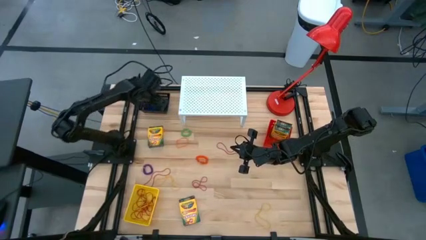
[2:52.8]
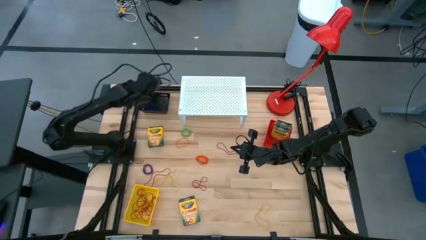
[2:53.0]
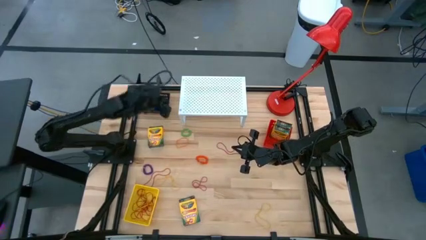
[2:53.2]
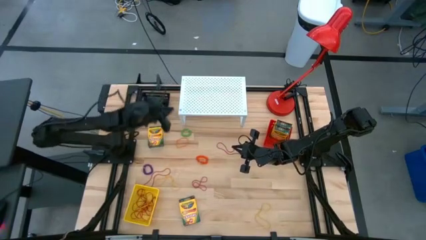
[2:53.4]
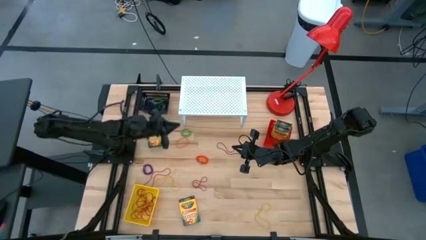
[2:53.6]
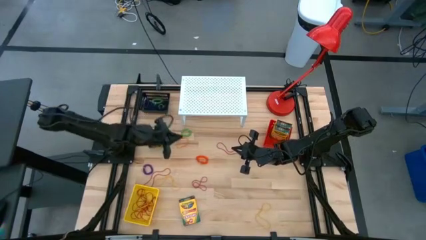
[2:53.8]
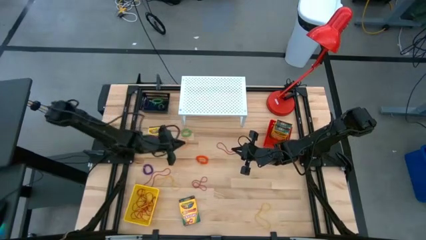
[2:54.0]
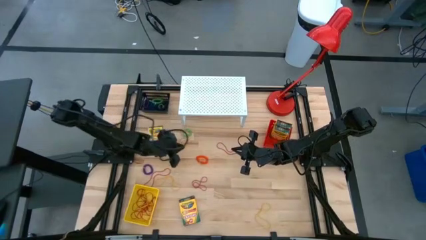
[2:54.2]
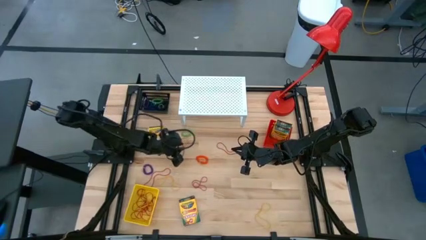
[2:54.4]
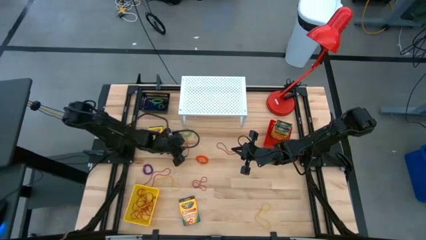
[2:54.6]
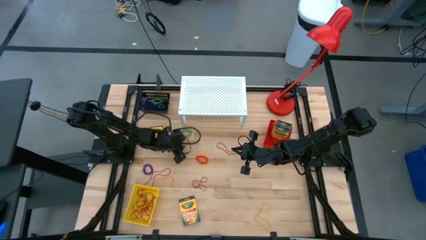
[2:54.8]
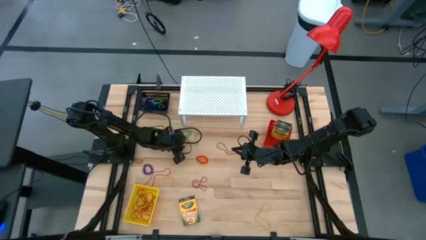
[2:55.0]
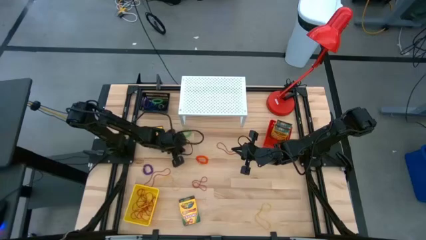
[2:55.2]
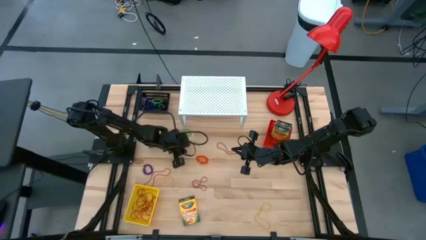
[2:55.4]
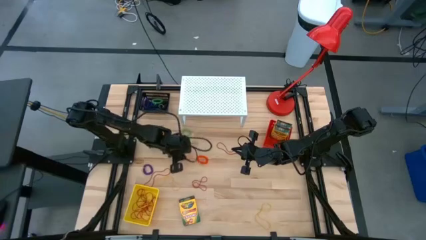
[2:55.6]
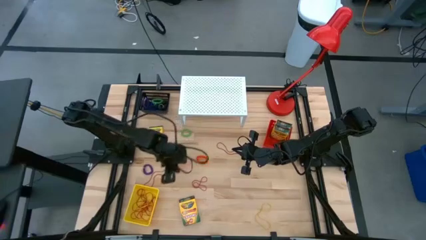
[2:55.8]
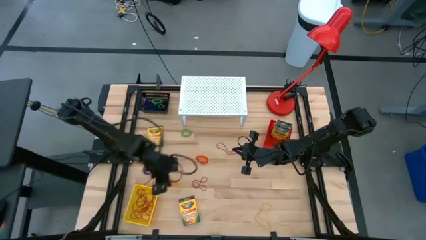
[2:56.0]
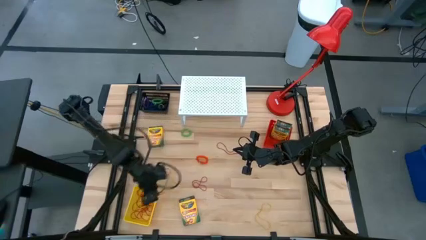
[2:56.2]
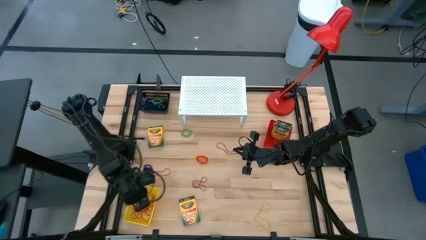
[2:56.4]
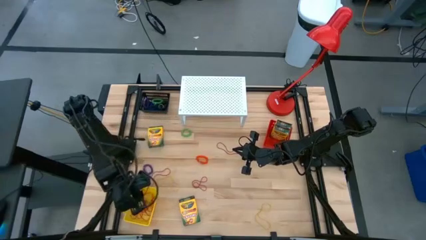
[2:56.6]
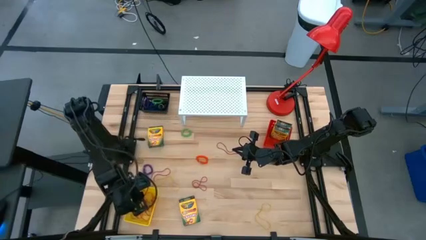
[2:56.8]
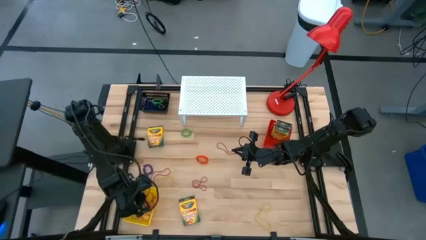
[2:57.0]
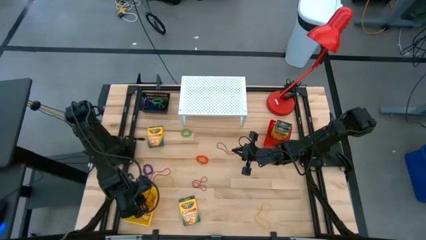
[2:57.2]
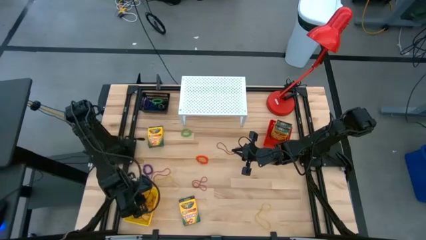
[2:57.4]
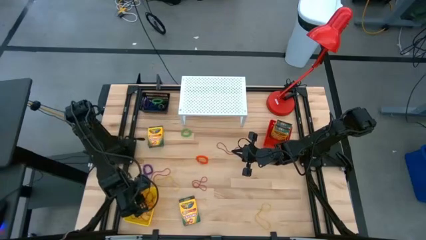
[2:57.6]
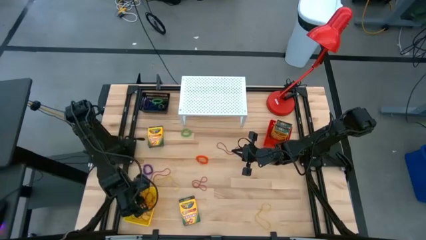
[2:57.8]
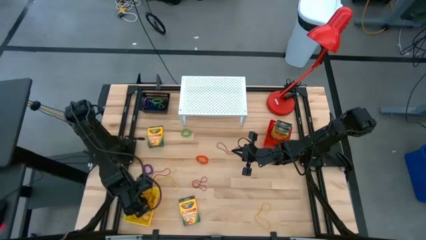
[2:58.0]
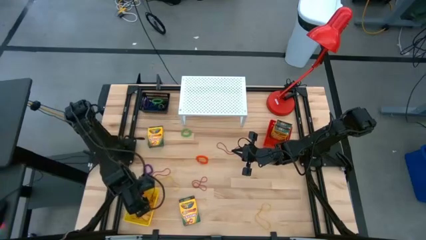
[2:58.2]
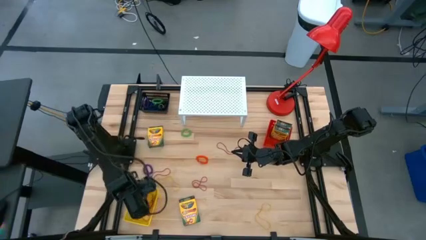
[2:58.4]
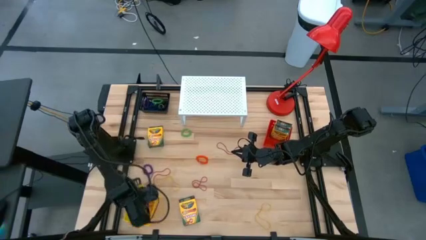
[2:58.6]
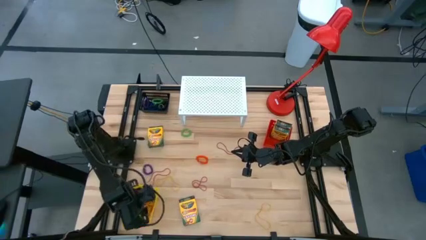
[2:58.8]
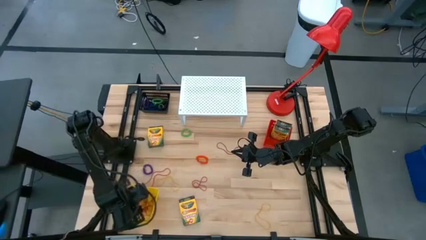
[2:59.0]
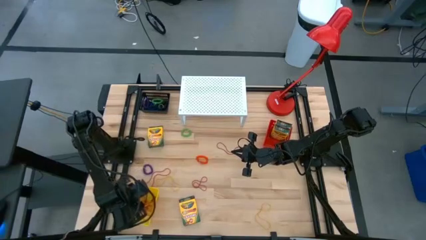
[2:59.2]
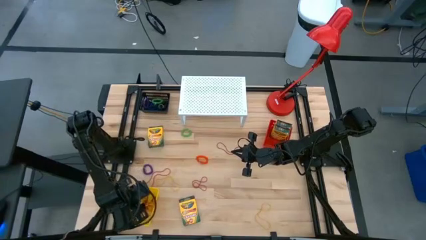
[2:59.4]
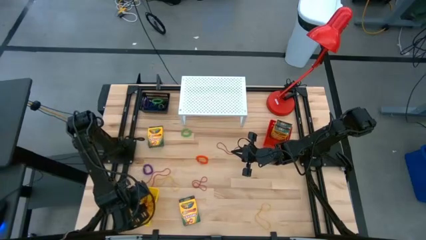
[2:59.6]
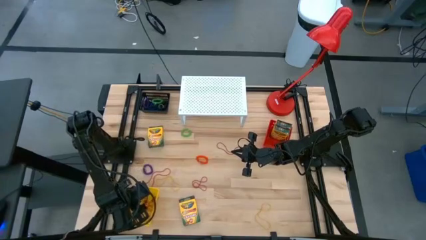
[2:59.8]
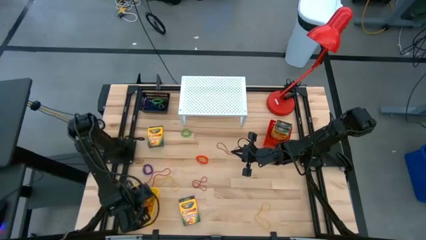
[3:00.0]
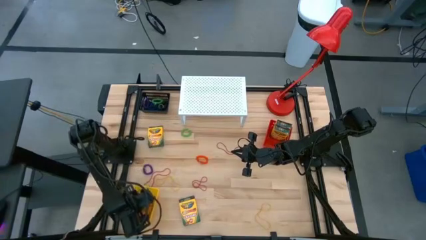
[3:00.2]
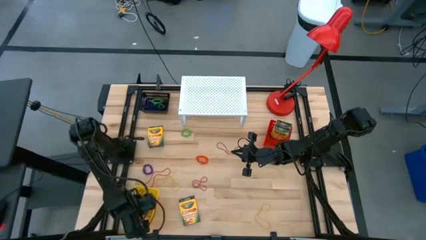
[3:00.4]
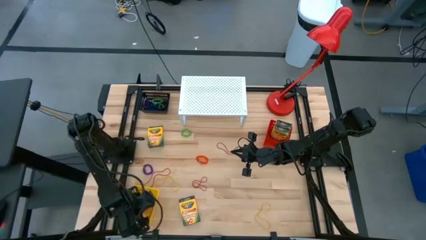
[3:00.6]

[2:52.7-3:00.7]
Task: Pick & Place Office Desk Supplies
Put the orange rubber band into the yellow bin

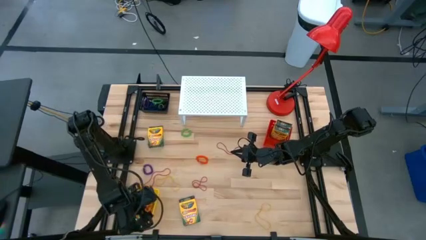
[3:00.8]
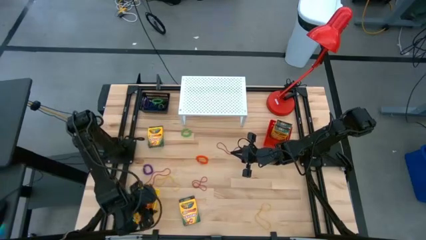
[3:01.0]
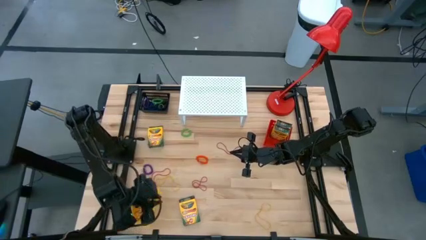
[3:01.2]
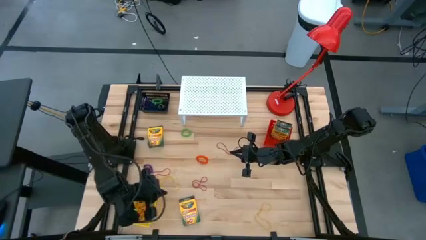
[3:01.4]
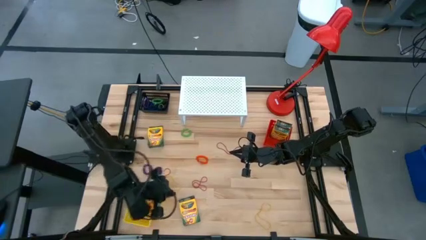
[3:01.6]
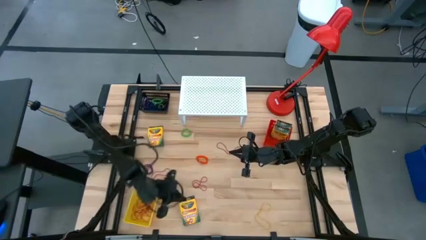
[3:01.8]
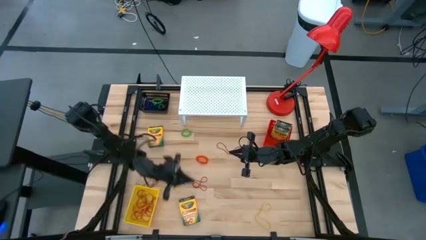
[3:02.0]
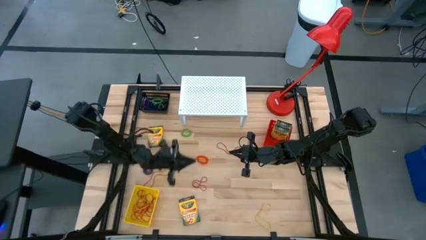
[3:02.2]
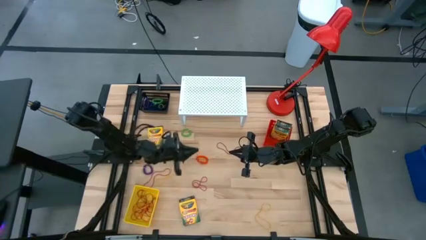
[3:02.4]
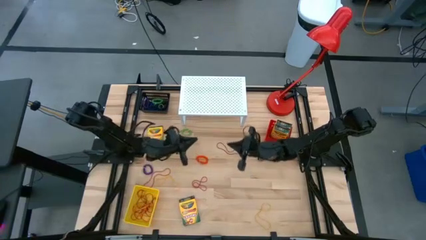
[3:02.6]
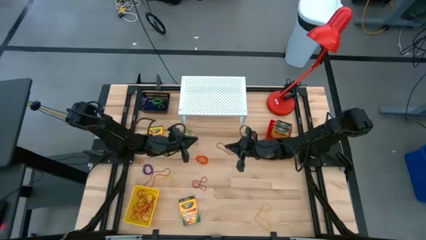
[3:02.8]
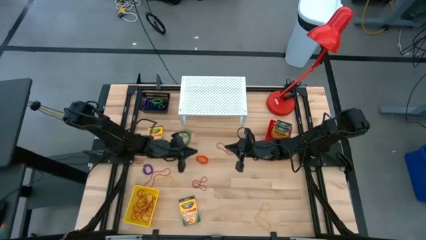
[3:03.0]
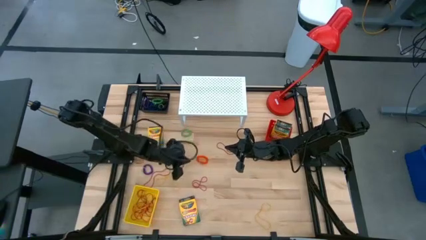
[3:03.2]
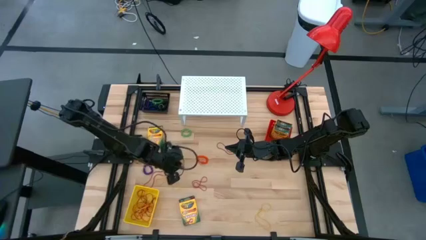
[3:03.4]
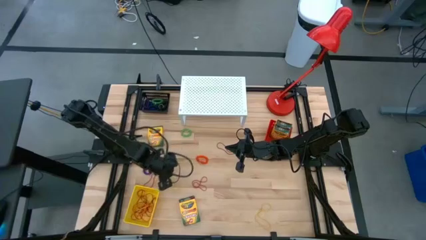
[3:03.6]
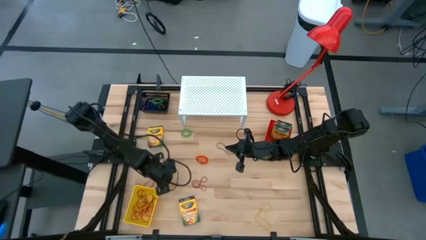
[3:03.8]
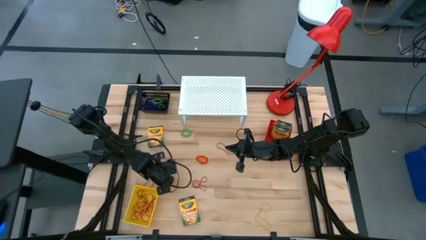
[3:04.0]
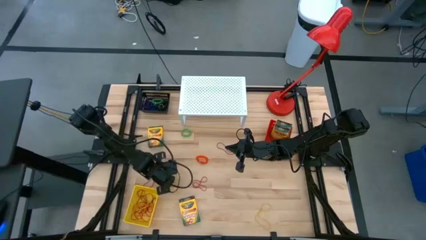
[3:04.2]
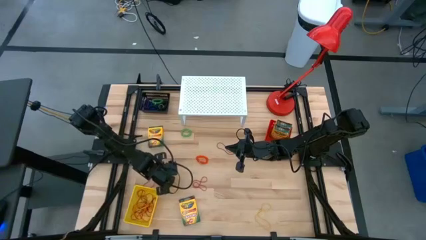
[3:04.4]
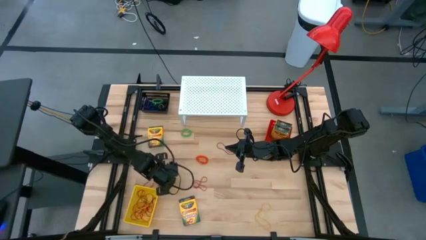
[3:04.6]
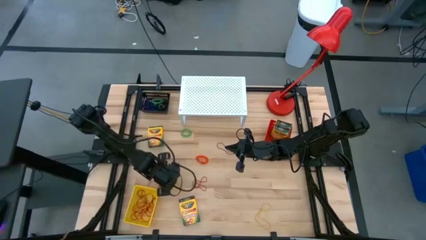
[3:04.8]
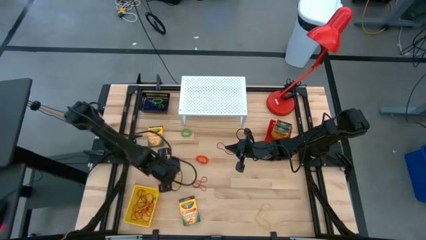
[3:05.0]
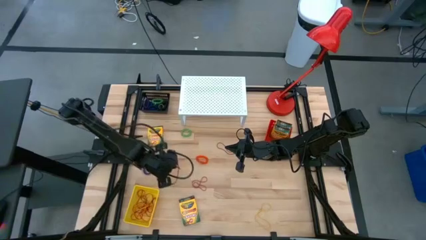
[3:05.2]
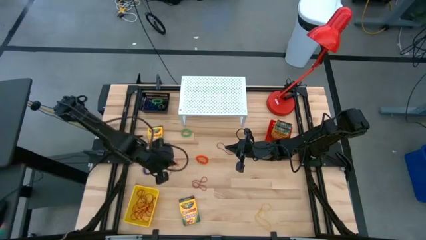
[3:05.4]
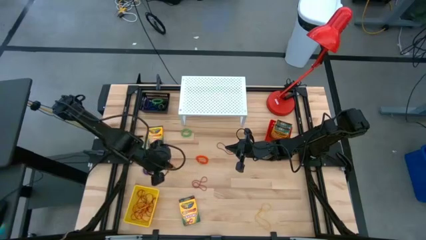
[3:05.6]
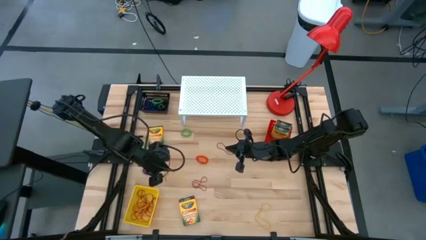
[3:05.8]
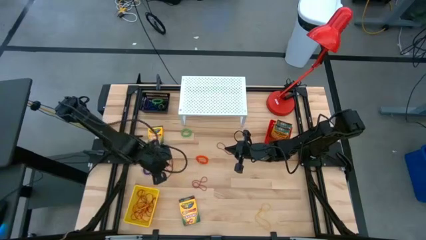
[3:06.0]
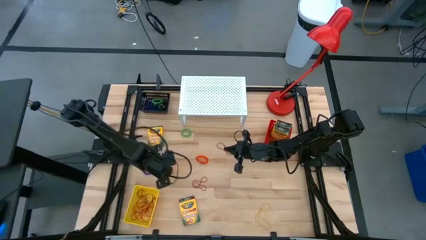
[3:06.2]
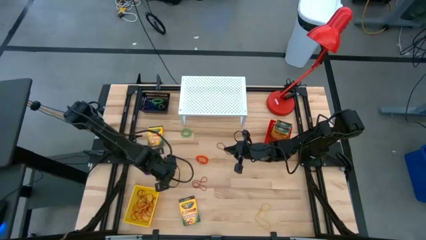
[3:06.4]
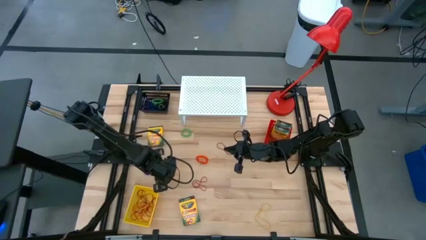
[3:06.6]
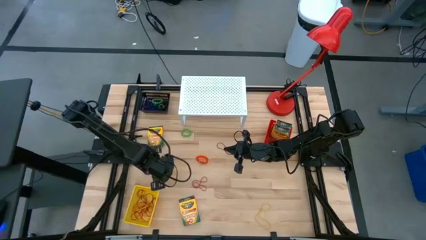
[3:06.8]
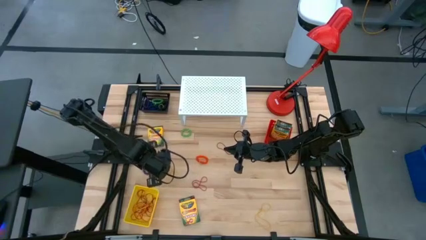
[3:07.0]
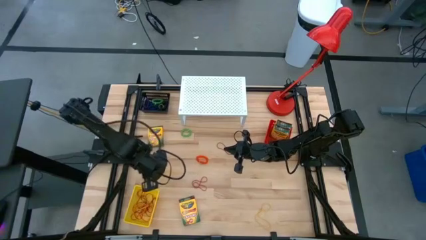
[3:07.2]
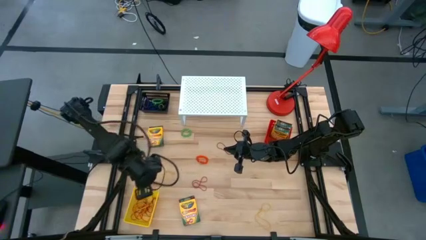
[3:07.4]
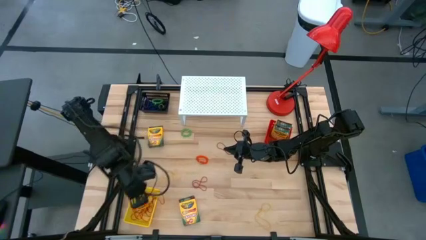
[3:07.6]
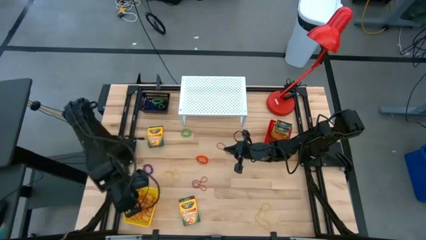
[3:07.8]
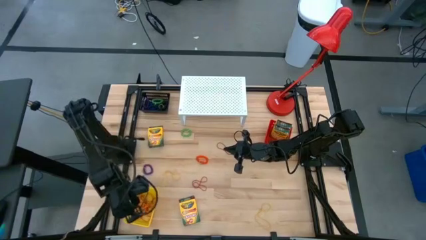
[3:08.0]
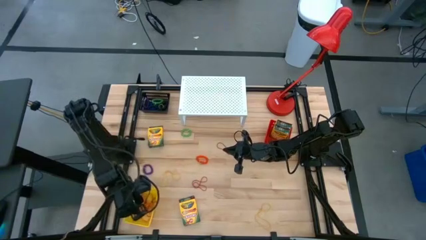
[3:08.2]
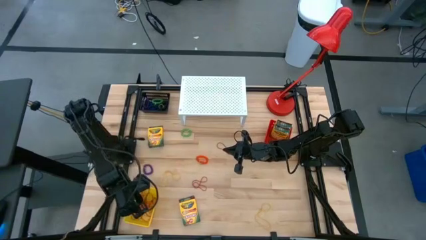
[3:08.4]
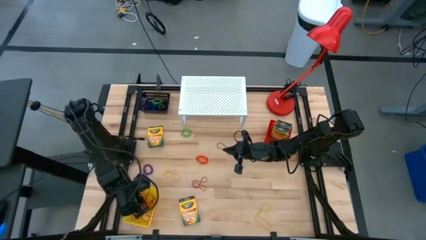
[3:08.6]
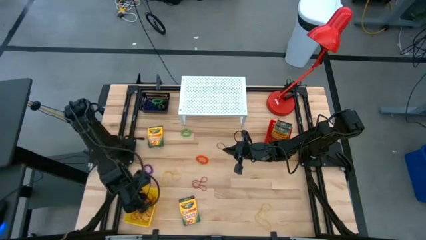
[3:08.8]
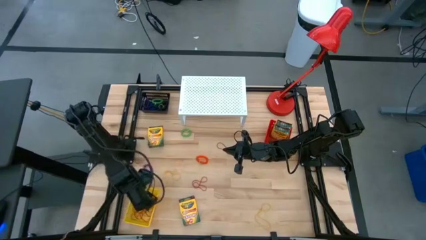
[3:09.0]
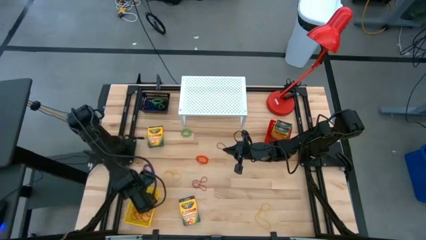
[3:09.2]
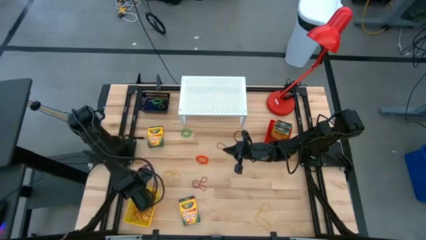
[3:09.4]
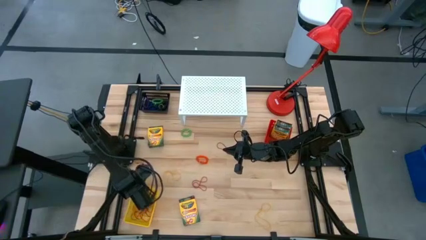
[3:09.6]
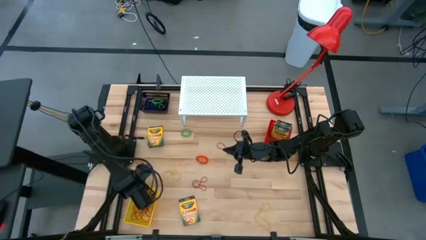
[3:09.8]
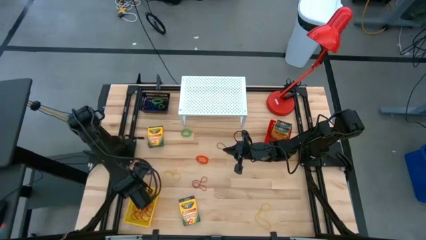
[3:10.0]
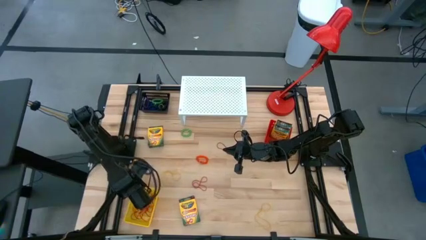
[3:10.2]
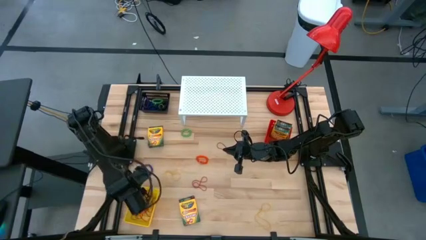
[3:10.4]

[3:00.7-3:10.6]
Put the red rubber band into the yellow bin
